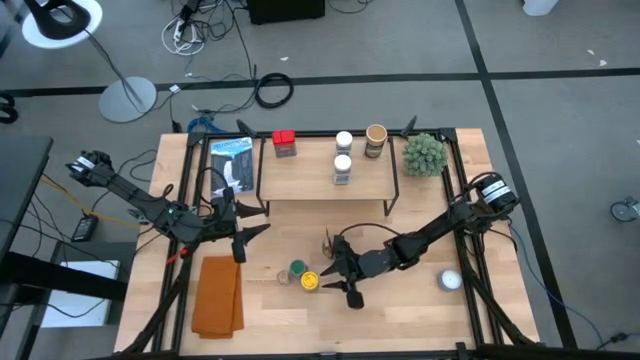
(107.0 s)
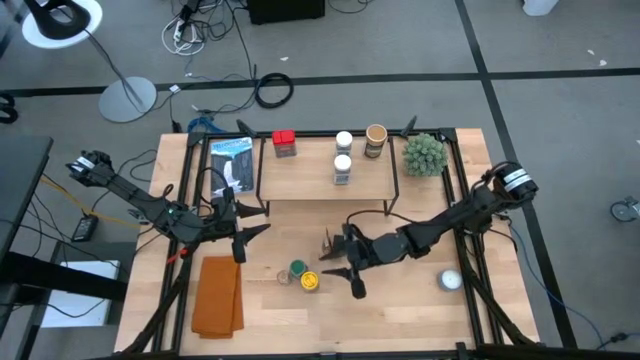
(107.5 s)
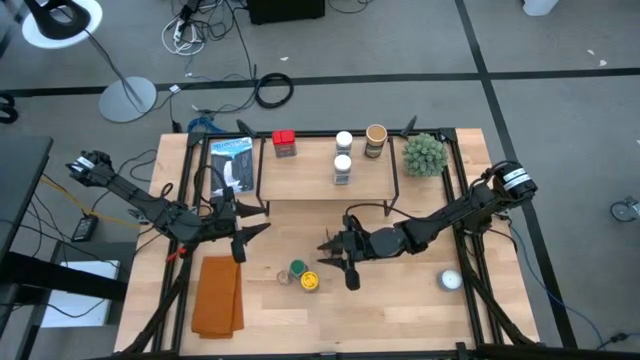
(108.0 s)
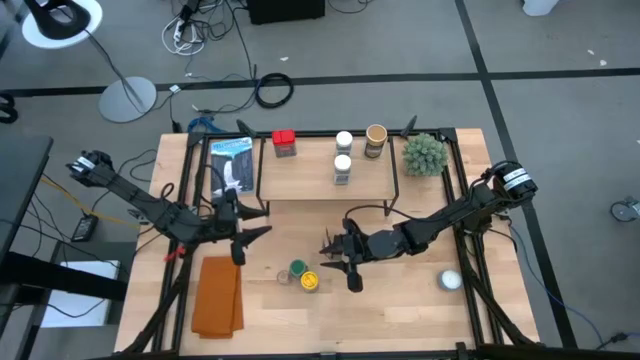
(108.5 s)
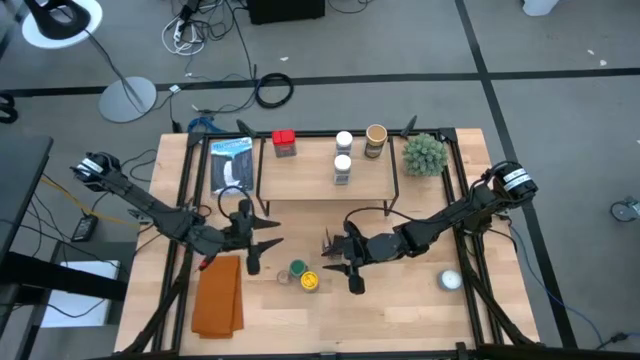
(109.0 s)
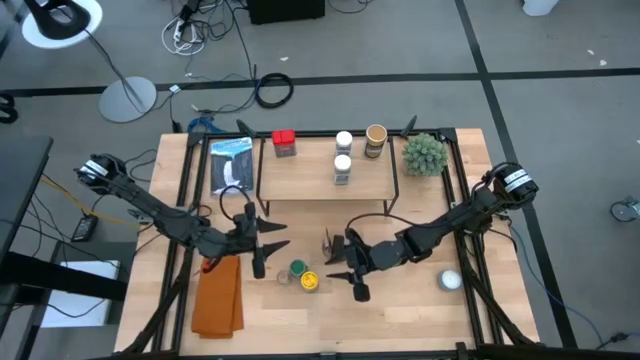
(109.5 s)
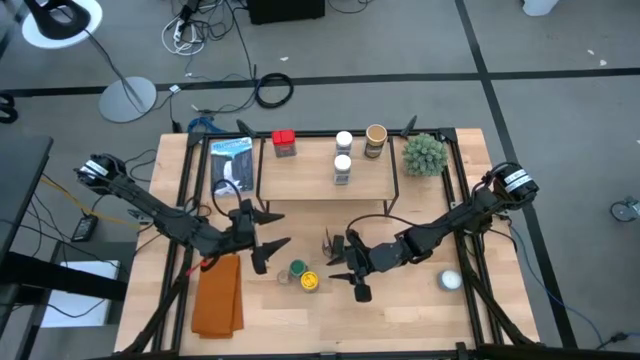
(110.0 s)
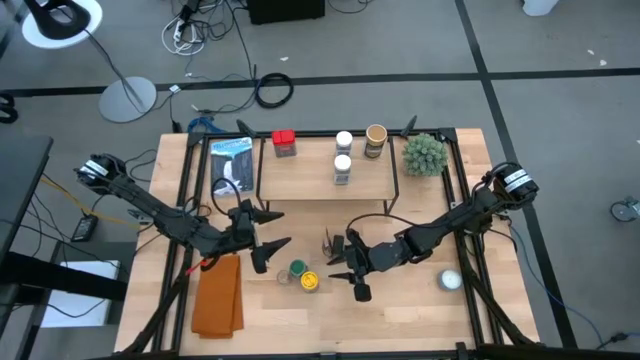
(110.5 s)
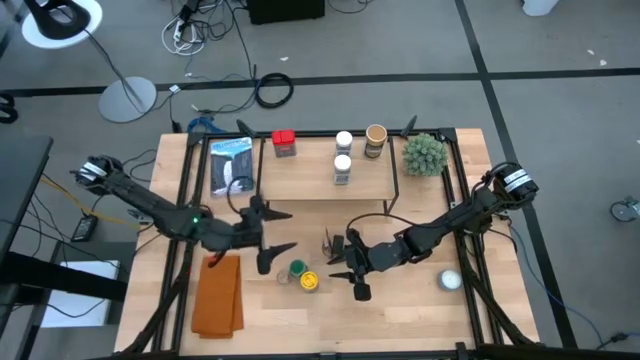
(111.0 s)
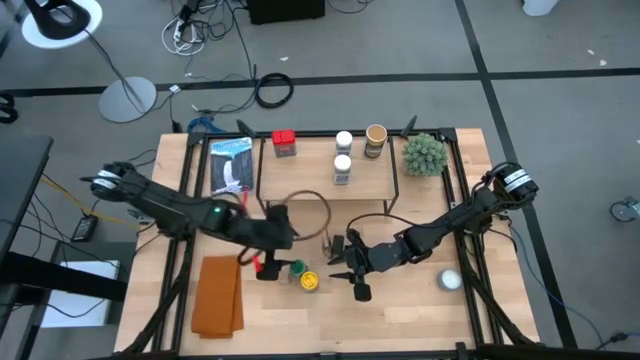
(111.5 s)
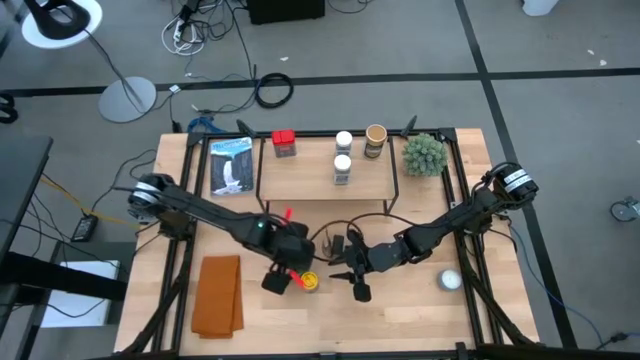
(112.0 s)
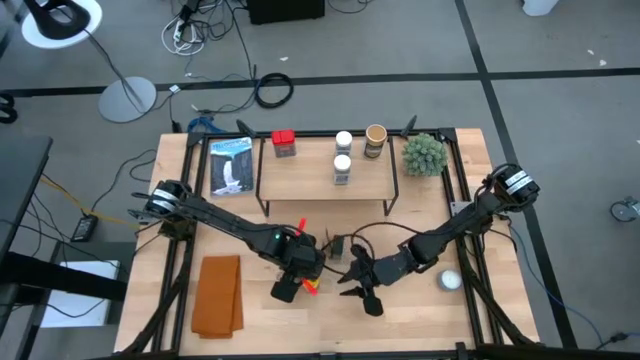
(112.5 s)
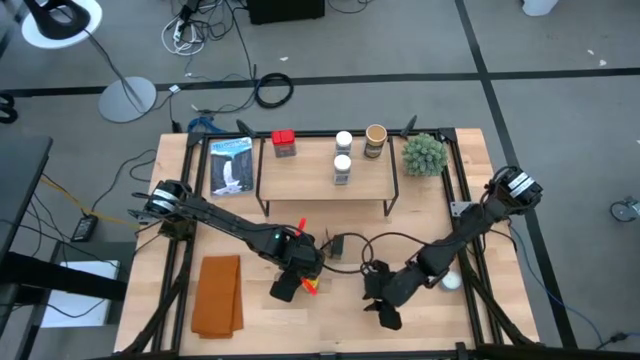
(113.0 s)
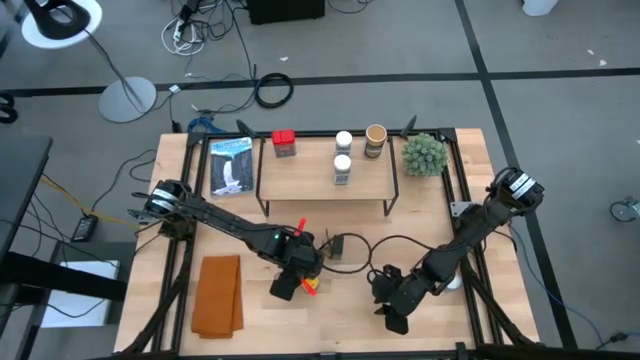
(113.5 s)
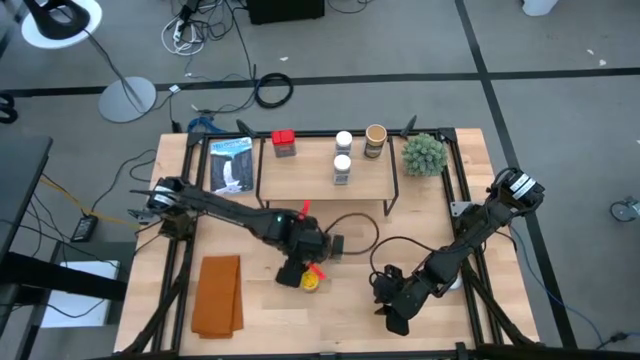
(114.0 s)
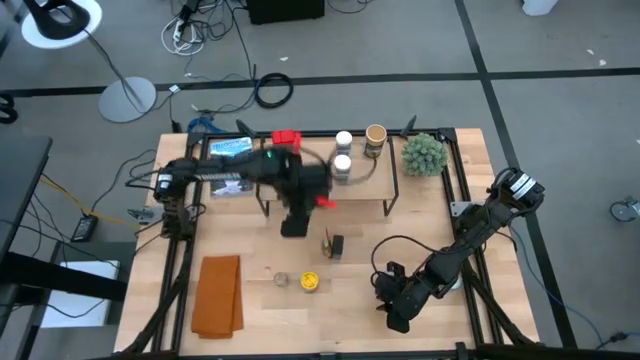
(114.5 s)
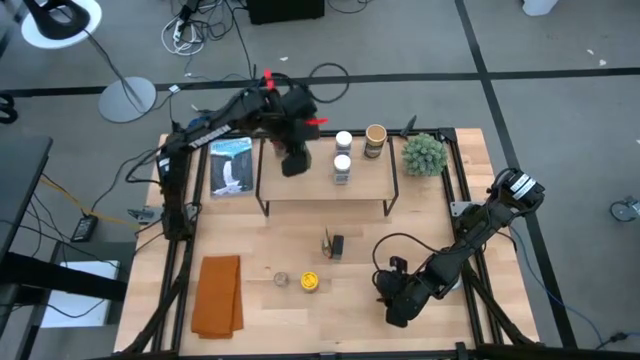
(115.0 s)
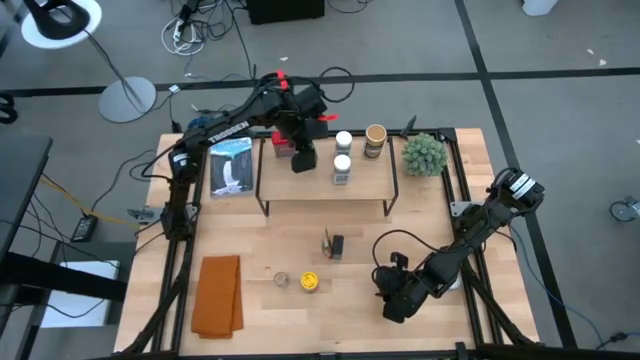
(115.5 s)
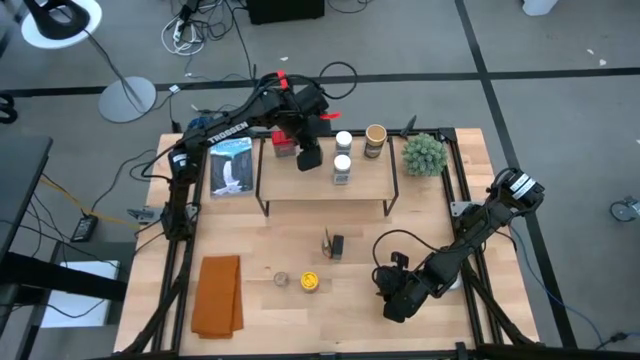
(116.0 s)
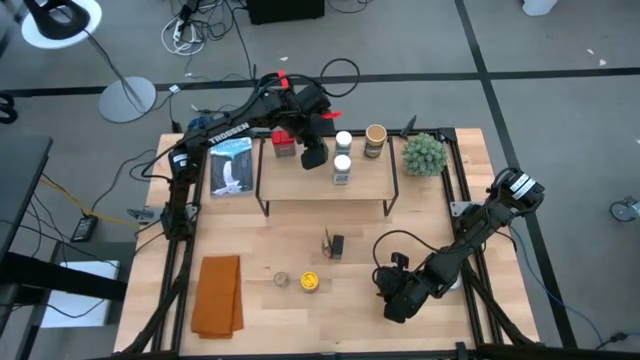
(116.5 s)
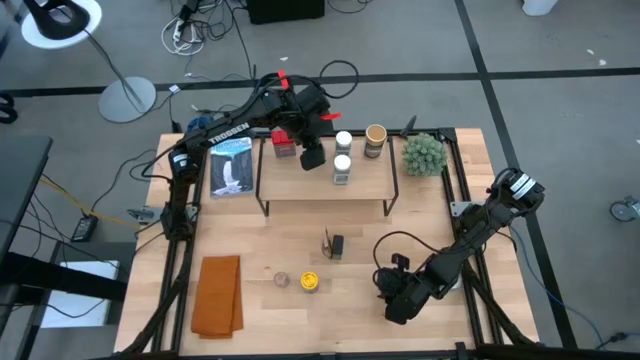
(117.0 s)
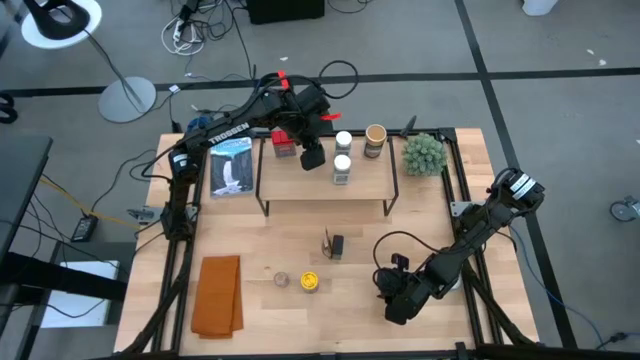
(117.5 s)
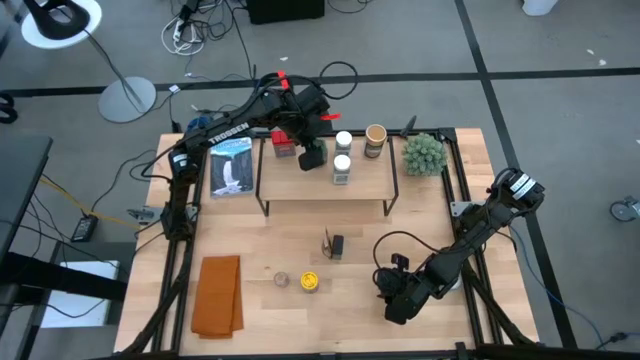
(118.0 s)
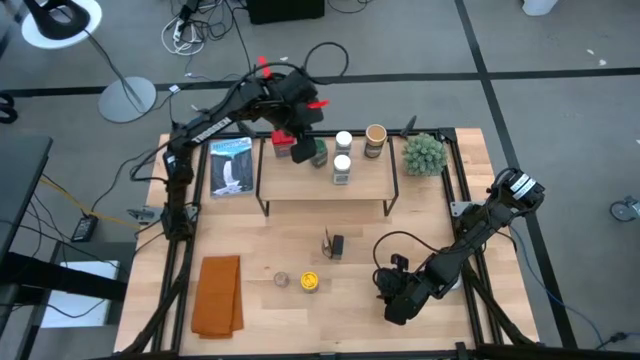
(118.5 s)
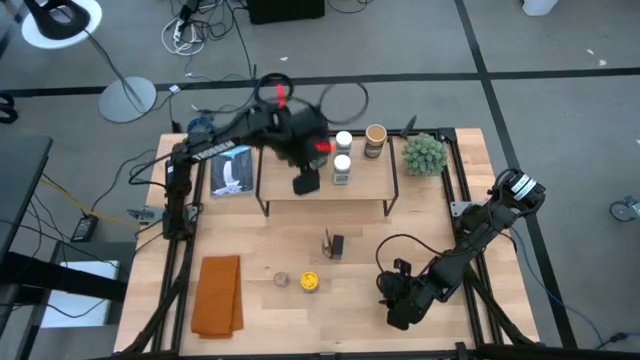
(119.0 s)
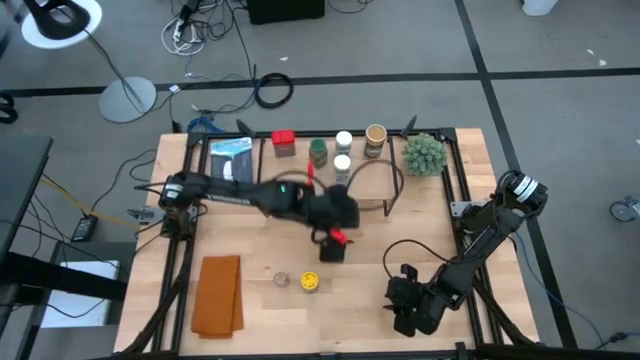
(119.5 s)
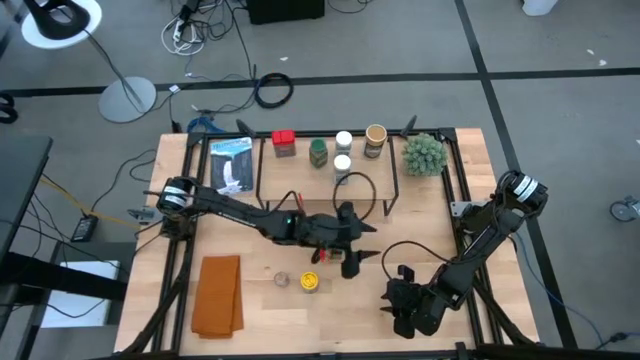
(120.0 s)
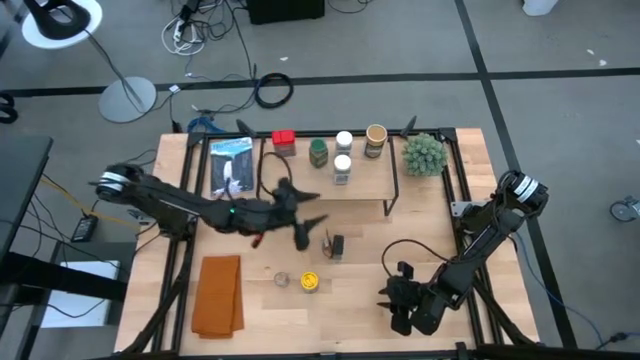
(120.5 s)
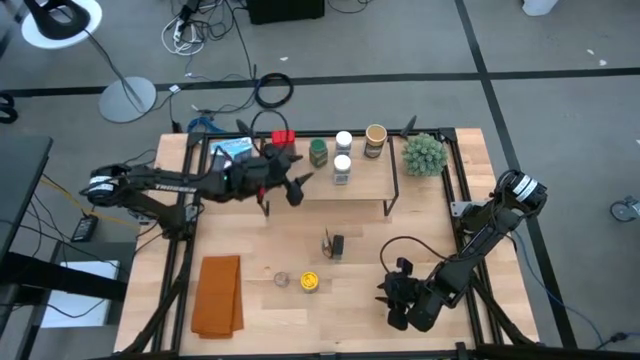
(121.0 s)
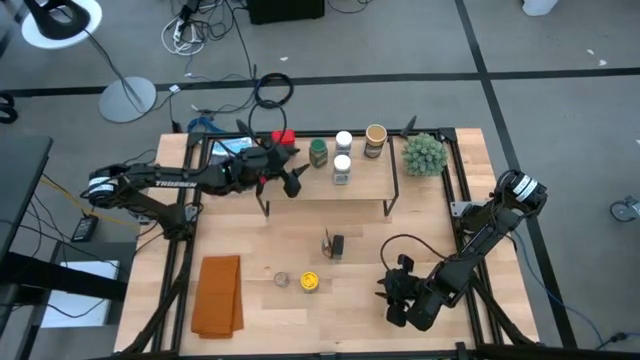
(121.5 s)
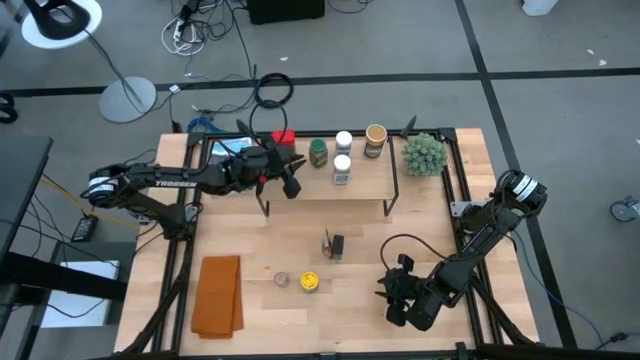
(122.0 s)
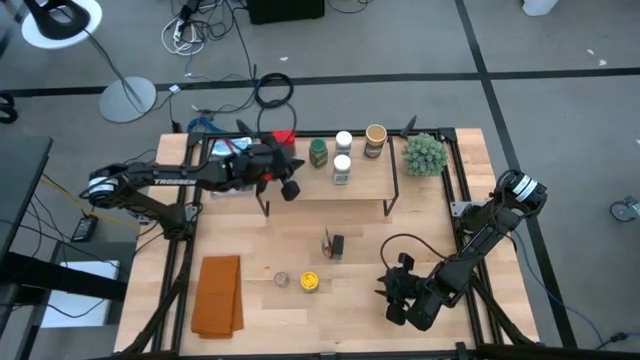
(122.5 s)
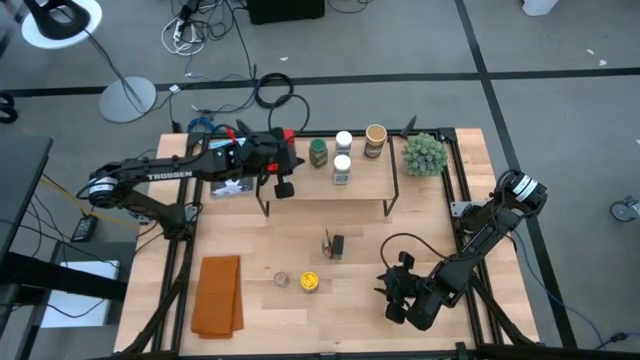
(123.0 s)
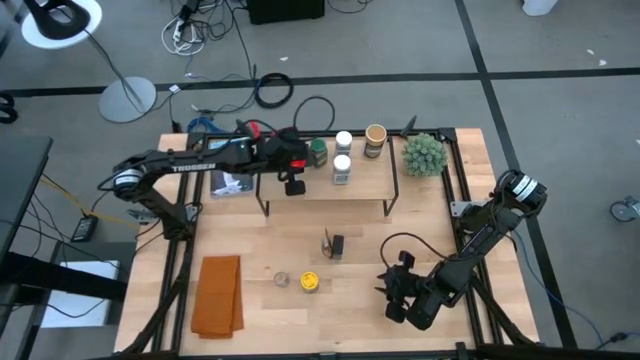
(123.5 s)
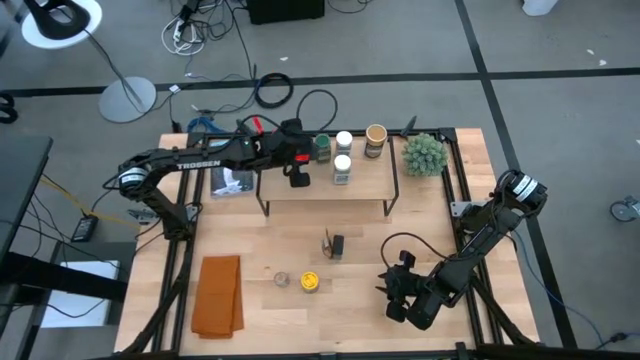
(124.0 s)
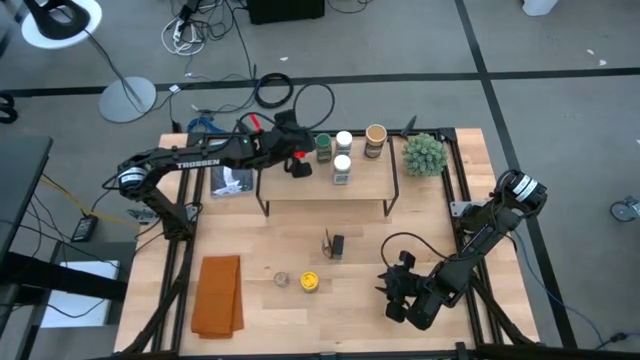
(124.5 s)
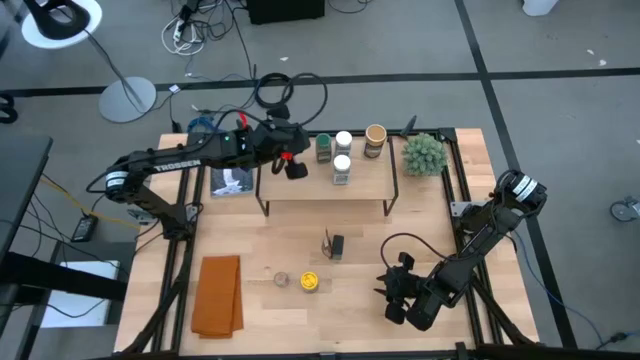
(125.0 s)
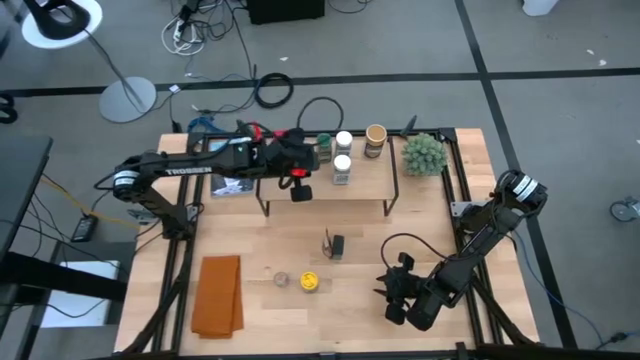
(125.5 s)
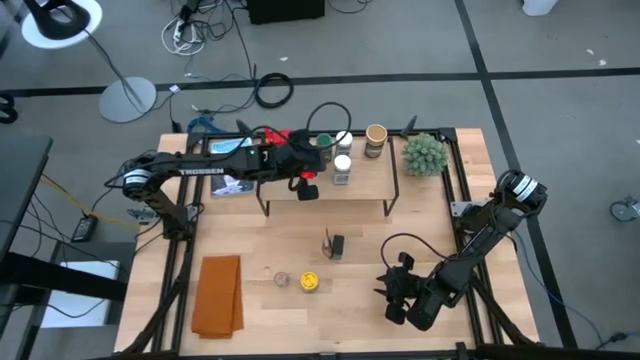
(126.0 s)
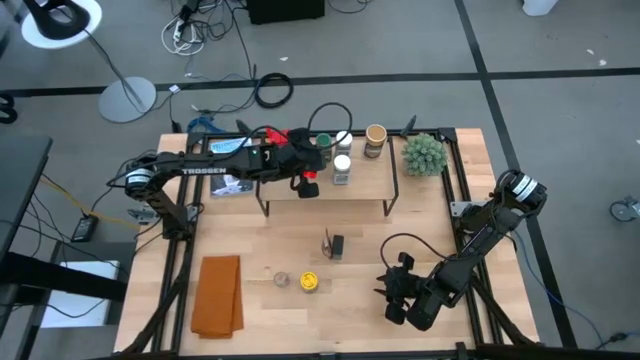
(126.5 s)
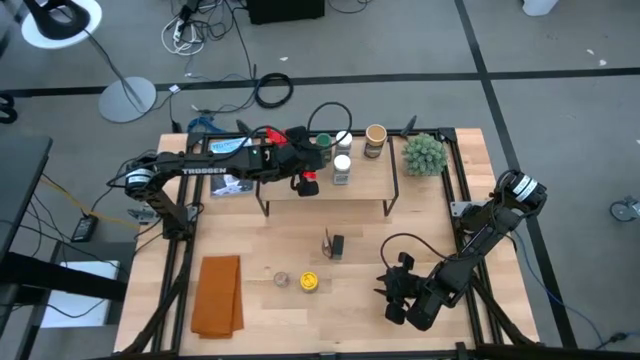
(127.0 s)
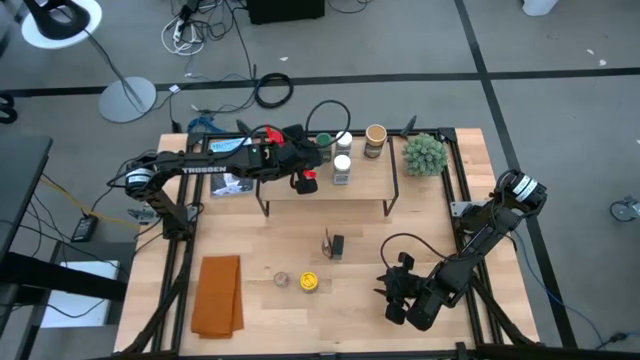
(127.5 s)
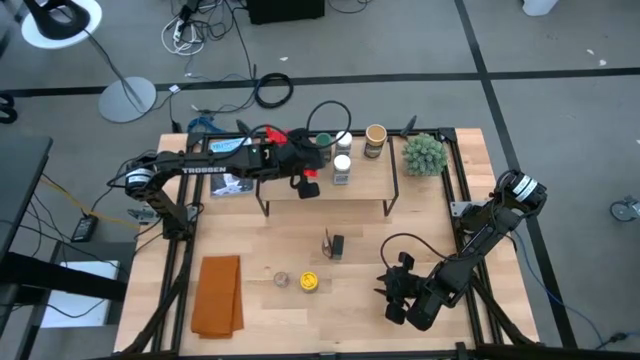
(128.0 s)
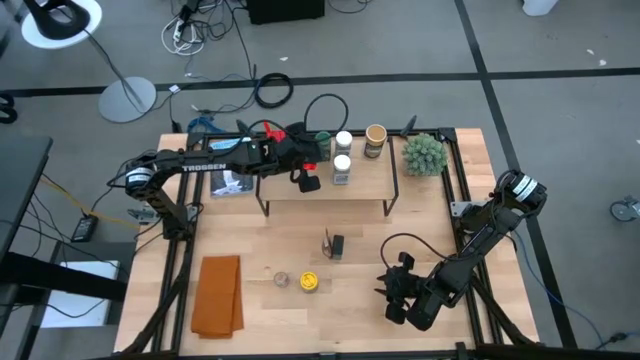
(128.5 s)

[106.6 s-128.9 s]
Task: Shelf spices
Put the green seasoning bottle on the shelf
